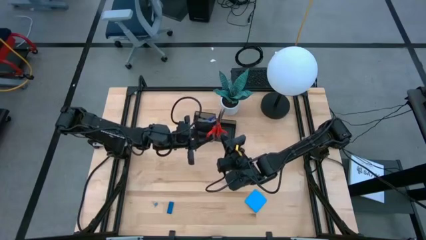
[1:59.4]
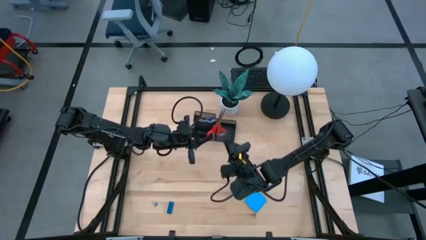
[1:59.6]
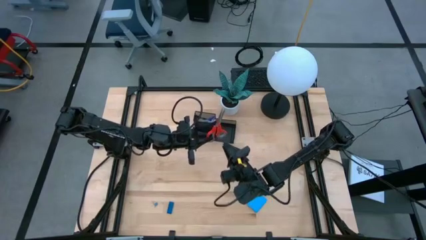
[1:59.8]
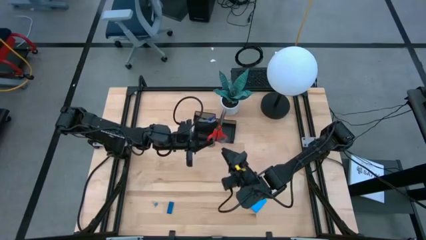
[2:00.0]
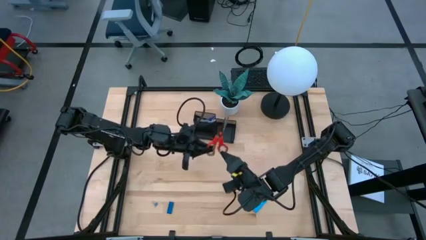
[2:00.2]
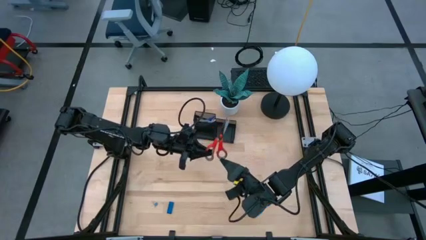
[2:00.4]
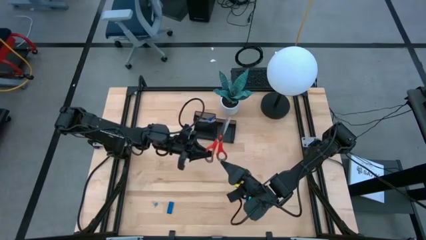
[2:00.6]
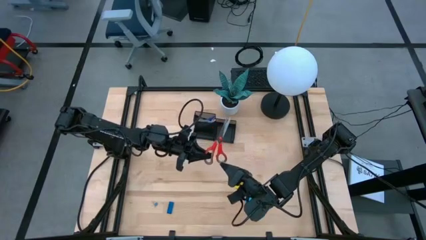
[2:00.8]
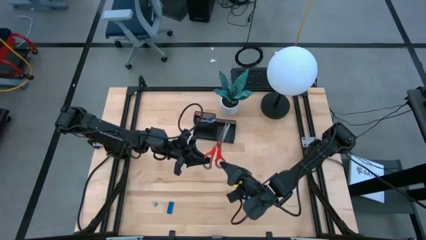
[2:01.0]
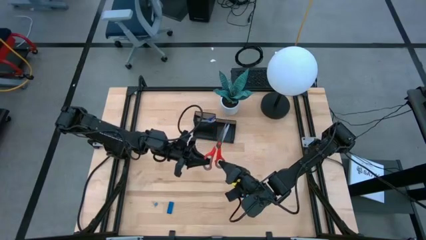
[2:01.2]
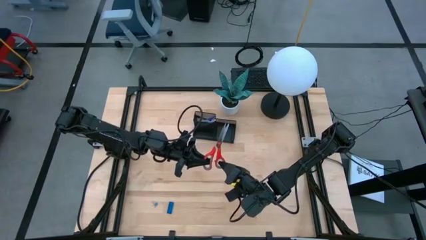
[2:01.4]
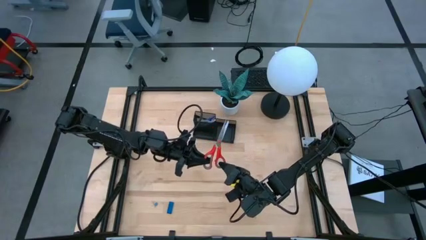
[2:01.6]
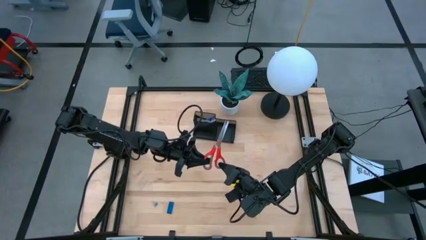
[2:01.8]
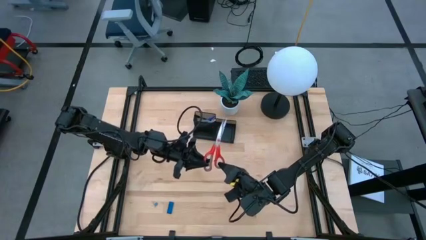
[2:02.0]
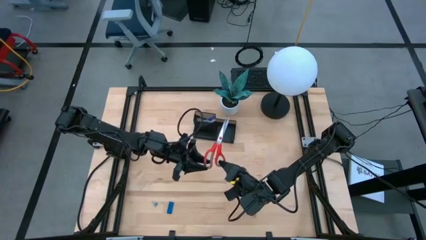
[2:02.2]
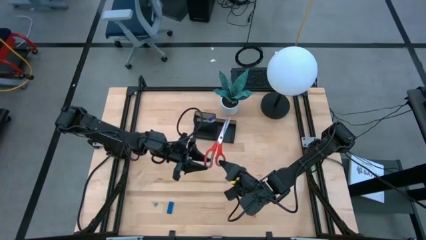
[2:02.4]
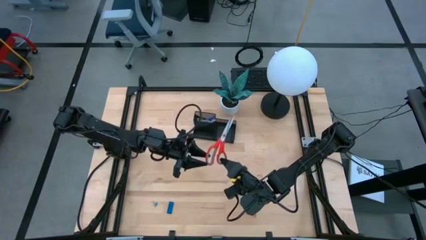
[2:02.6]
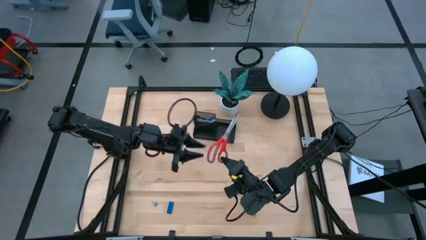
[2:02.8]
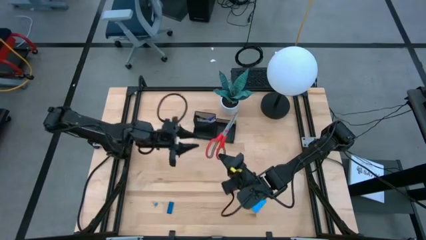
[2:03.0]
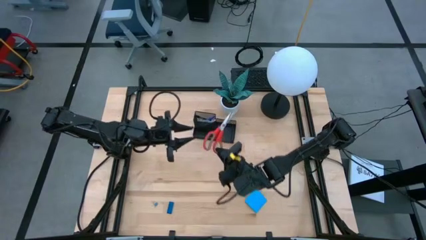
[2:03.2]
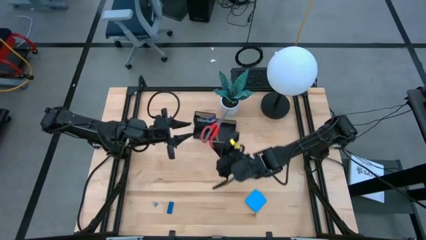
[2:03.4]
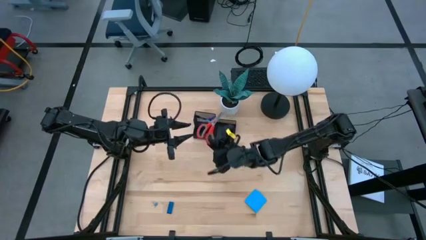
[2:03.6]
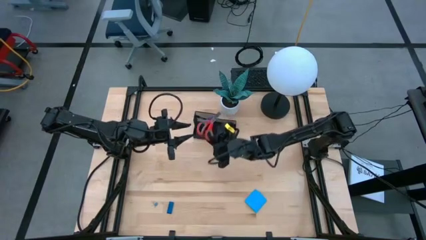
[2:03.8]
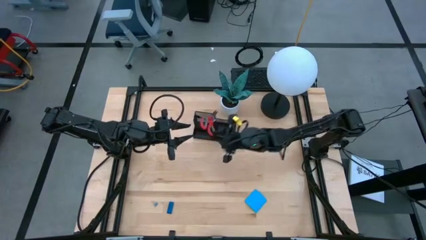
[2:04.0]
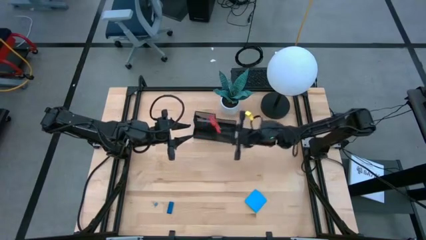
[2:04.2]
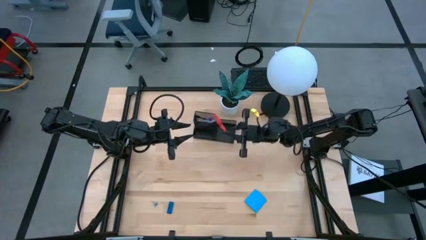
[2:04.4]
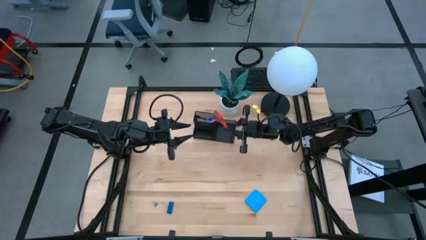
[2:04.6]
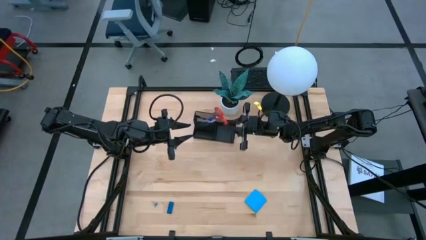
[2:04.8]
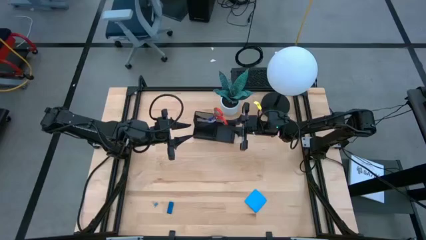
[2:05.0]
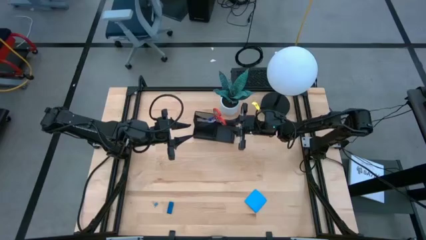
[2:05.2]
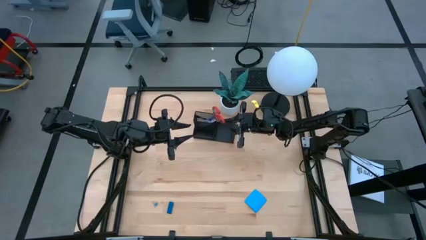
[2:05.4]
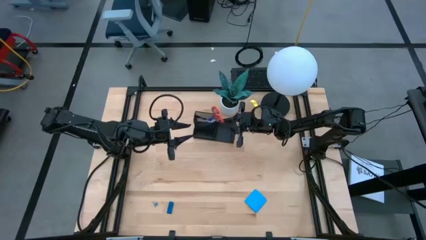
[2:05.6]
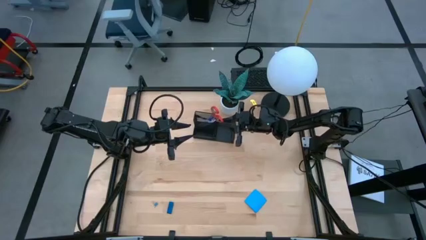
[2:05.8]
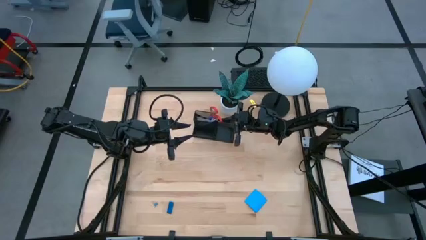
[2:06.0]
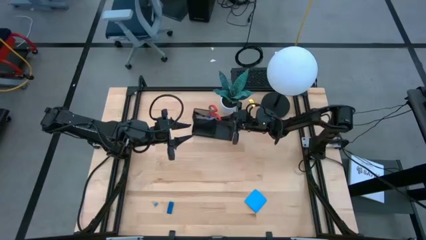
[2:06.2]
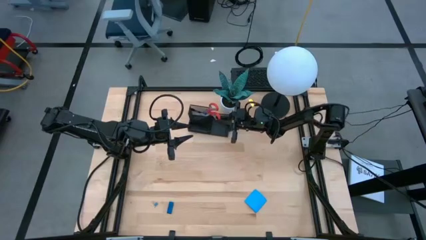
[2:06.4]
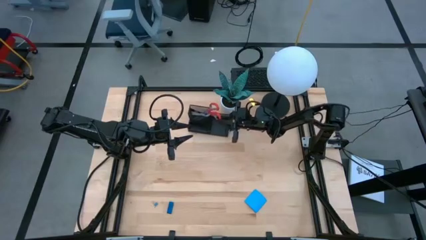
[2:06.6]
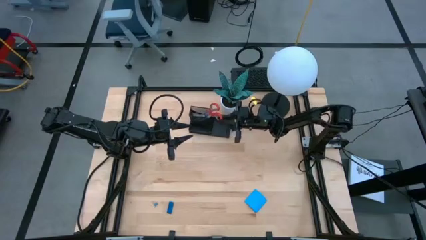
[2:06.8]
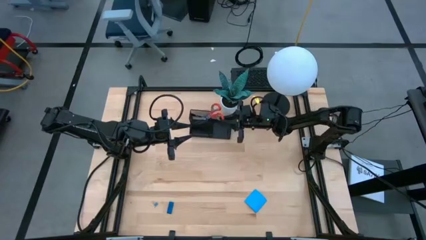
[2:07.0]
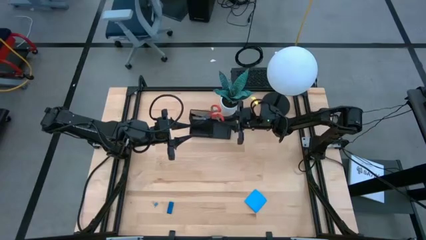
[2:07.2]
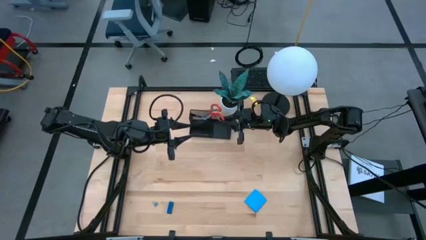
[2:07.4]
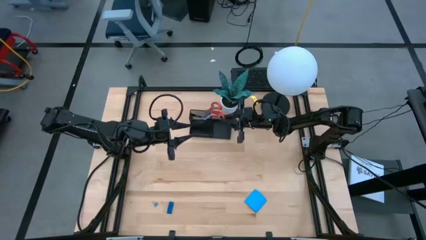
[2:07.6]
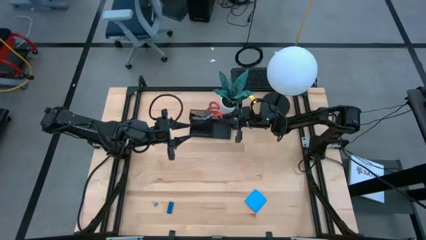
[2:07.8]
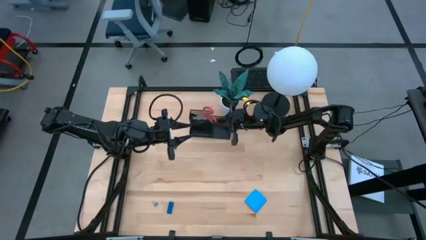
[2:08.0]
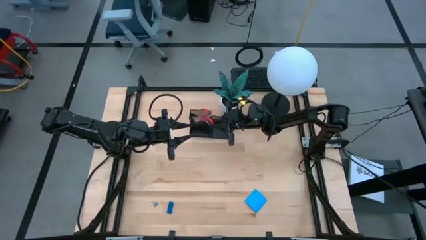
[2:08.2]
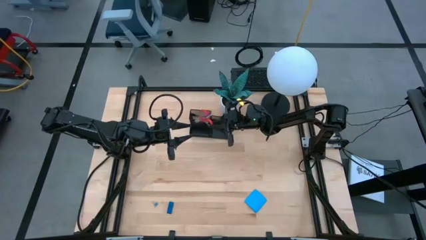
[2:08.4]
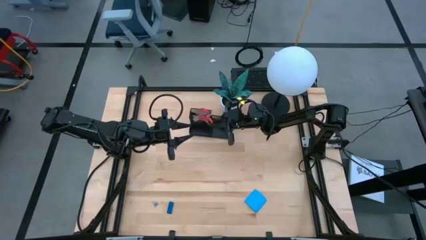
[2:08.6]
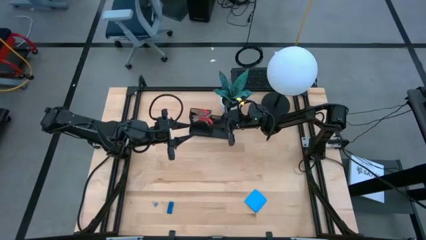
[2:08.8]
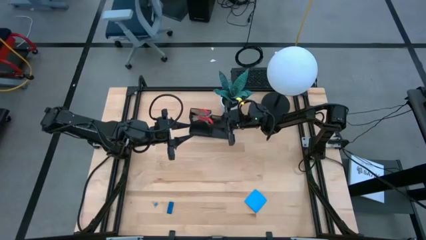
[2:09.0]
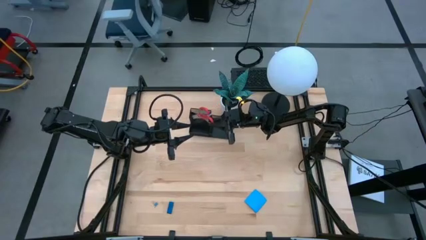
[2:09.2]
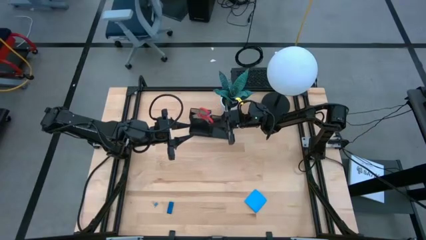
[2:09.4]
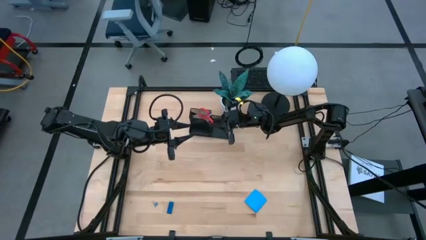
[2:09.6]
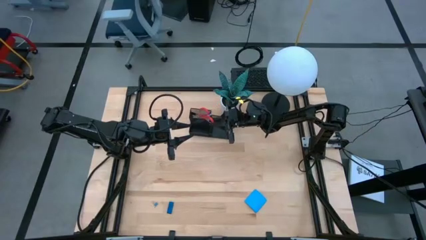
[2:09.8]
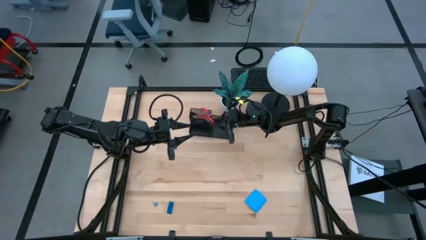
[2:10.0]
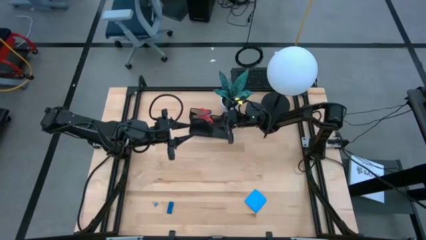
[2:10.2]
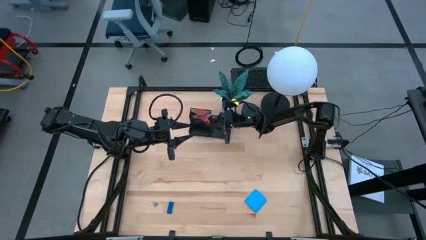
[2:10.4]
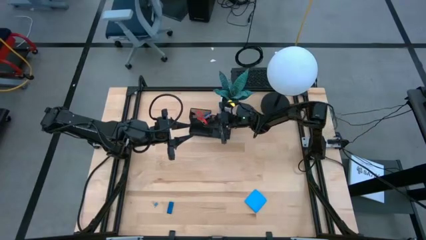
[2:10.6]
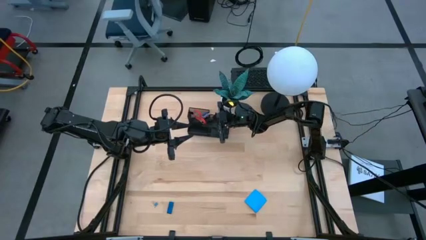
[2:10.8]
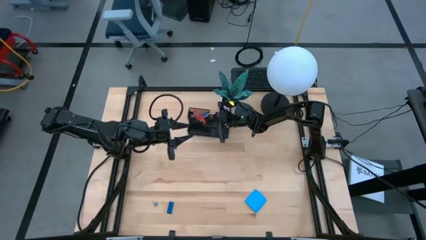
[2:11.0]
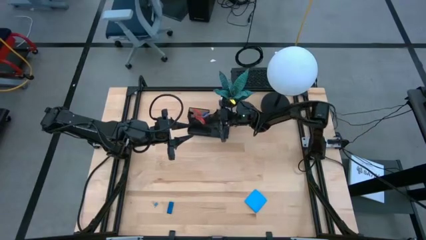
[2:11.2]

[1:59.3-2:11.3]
Task: Pick and place office supplies into organizer
Put the red scissors into the black desk organizer
